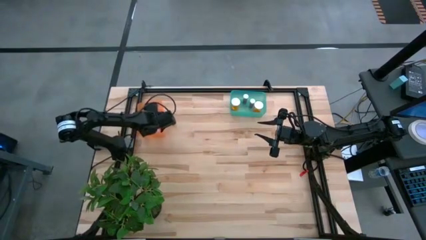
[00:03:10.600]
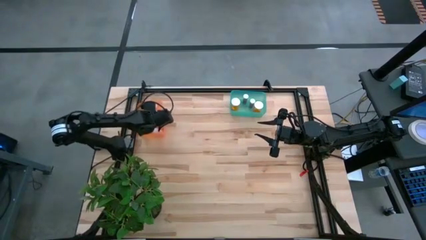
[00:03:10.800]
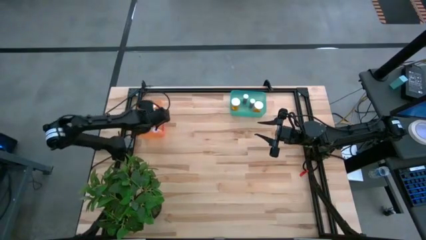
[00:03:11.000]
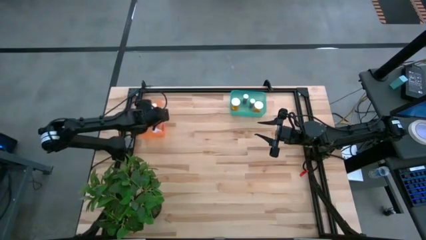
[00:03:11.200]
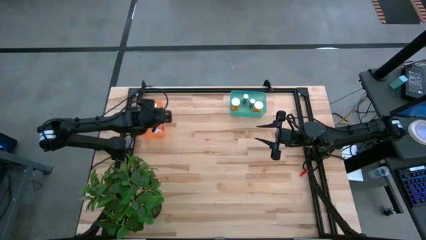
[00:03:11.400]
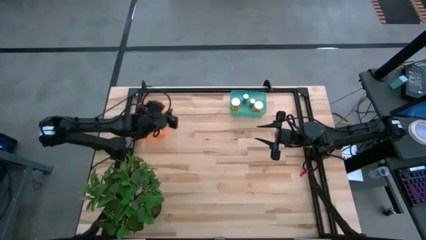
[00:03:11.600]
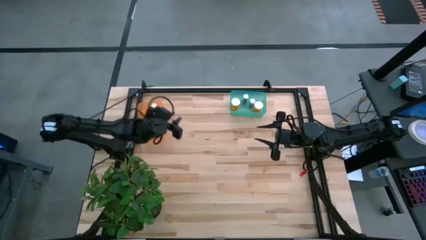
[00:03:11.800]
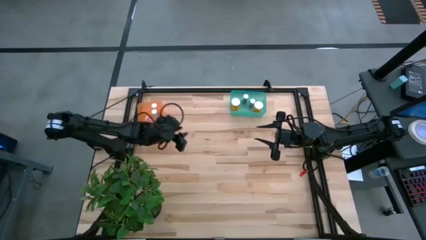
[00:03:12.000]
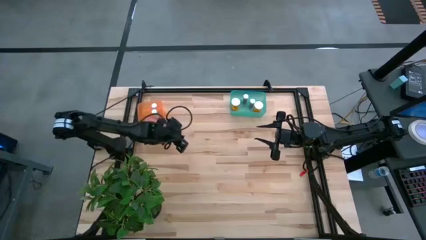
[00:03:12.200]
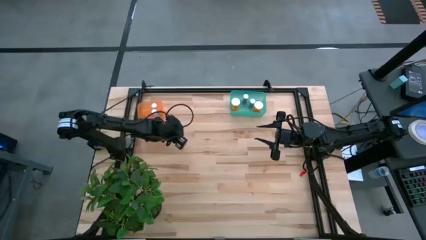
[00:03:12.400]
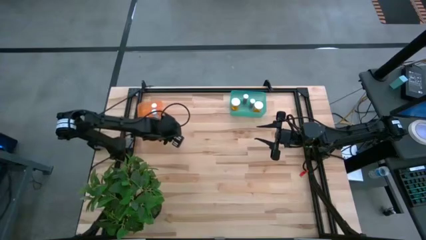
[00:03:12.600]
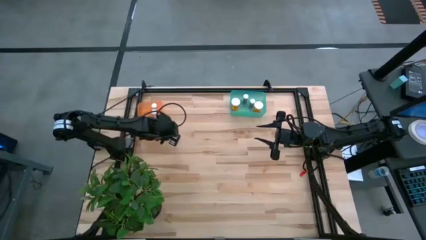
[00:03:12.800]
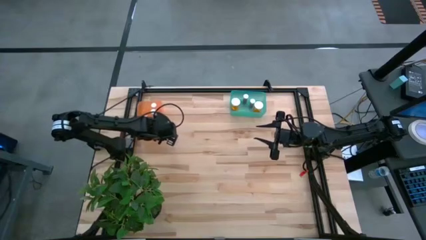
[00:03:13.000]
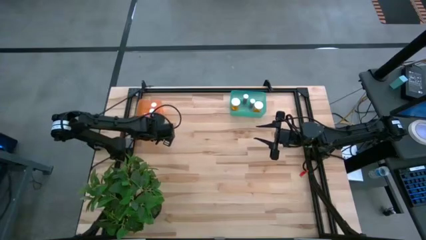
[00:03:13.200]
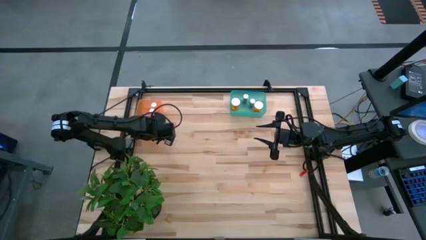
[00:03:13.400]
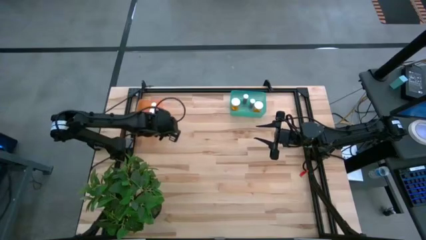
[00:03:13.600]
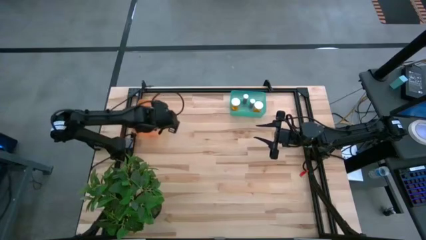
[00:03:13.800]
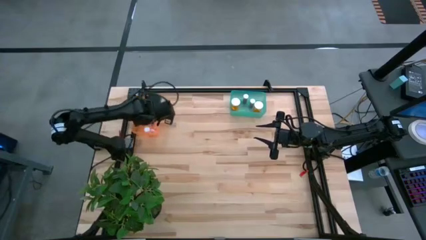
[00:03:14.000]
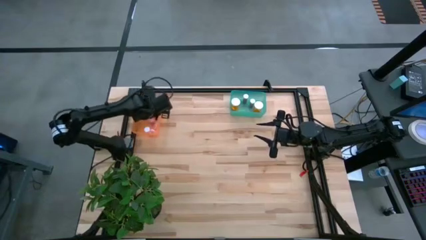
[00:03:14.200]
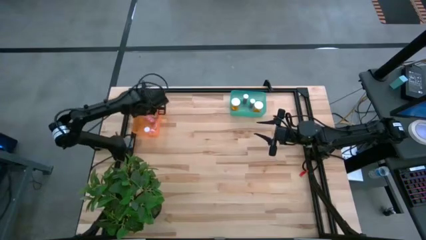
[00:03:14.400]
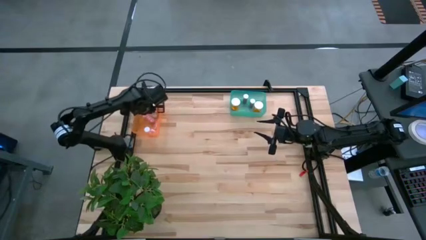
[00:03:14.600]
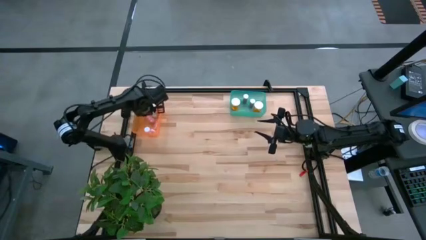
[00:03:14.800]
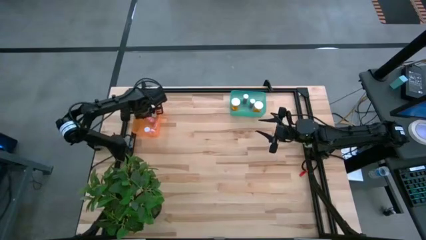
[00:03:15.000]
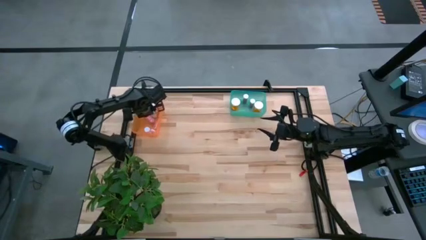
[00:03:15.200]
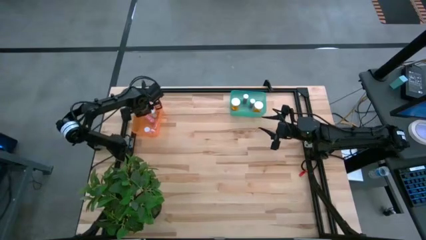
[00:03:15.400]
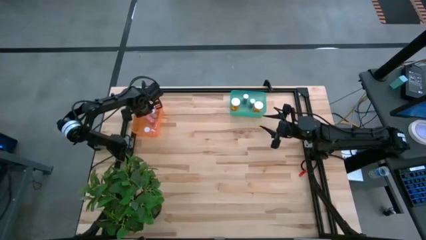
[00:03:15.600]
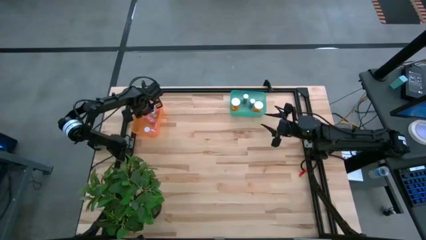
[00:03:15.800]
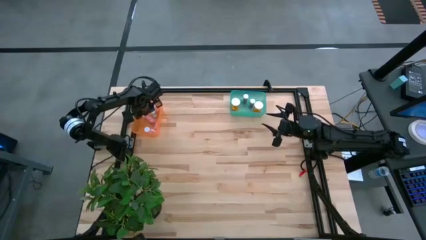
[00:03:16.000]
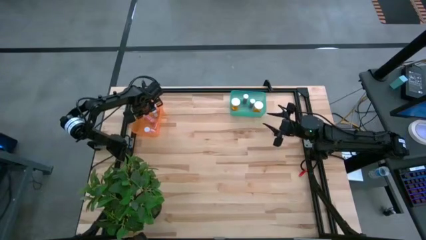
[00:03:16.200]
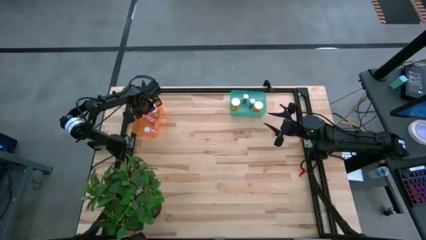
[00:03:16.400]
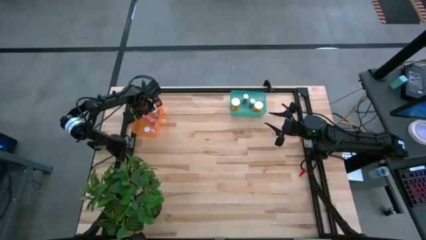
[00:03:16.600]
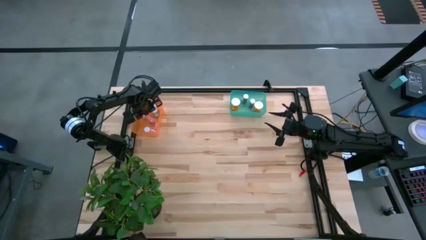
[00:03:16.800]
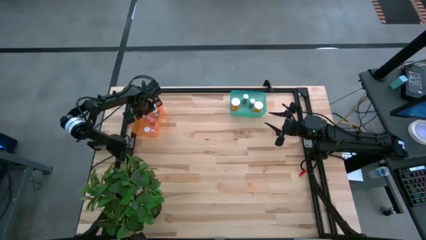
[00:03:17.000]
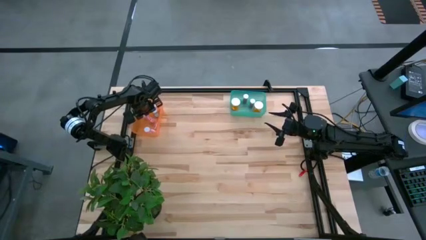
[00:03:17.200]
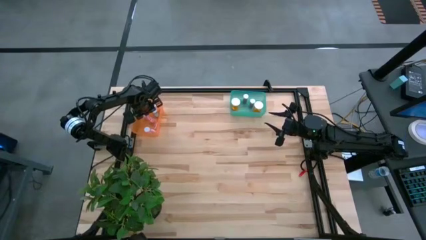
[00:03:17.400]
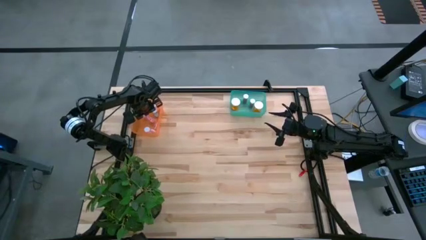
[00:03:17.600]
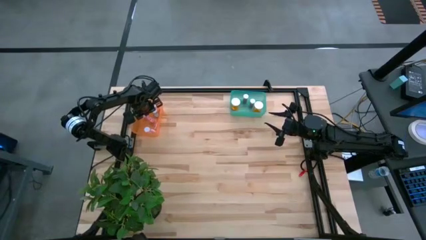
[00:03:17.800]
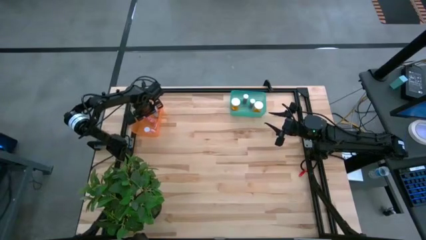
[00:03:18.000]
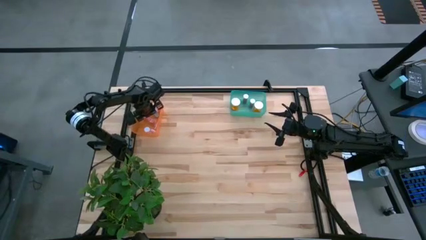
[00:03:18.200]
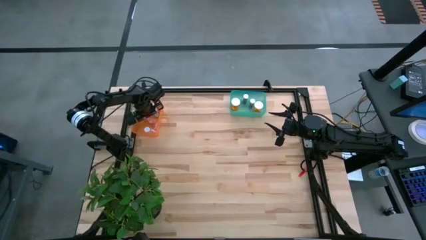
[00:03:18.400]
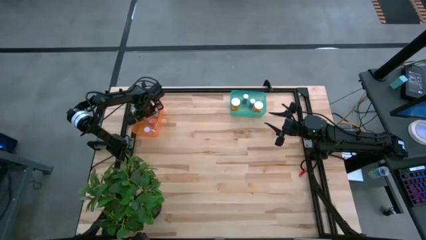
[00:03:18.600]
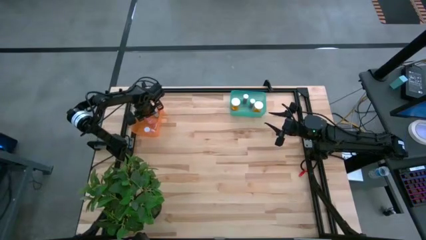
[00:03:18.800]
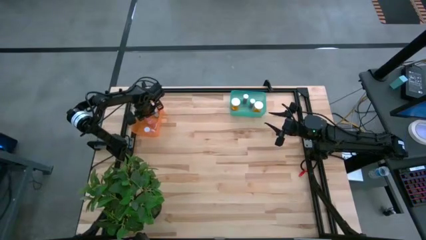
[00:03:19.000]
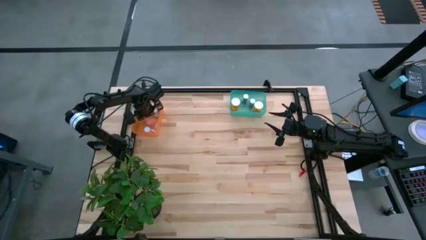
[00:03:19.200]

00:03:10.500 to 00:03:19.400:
Task: Pick and place medicine bottles into bin by pill shape (circle, oval)
Adjust the pink tablet bottle in the orange bin

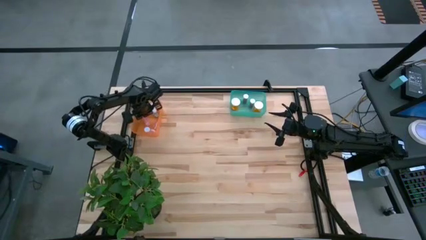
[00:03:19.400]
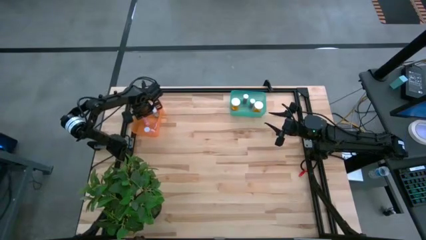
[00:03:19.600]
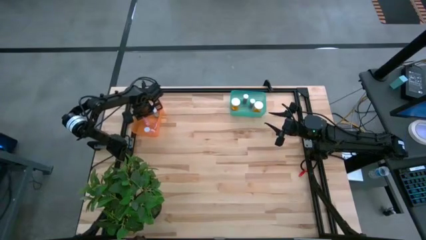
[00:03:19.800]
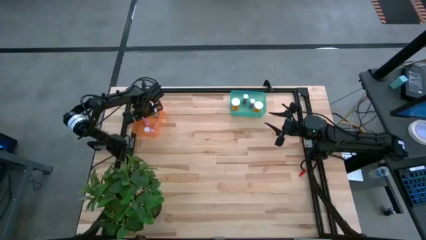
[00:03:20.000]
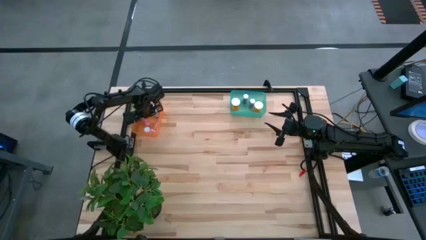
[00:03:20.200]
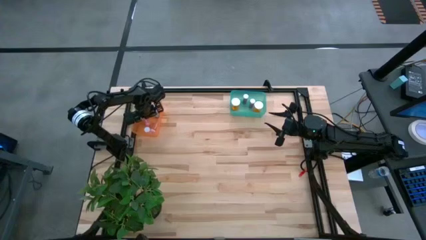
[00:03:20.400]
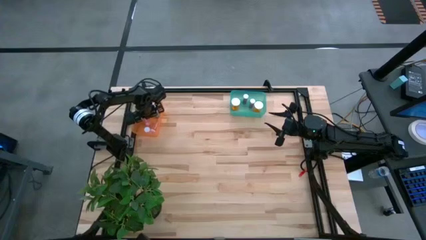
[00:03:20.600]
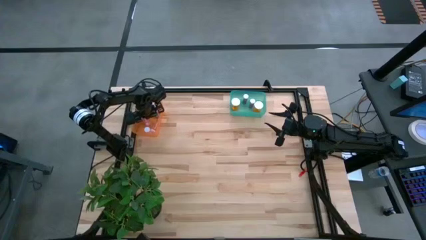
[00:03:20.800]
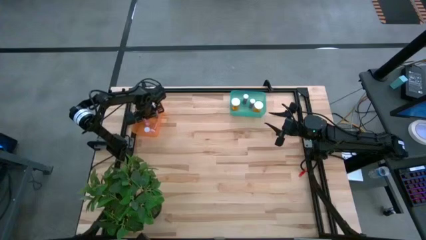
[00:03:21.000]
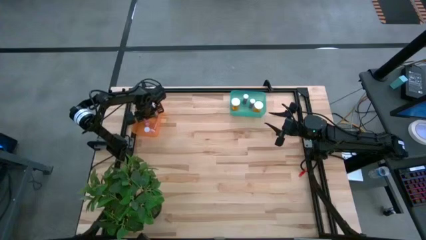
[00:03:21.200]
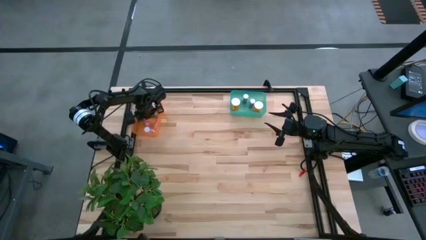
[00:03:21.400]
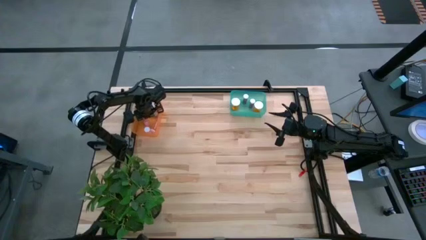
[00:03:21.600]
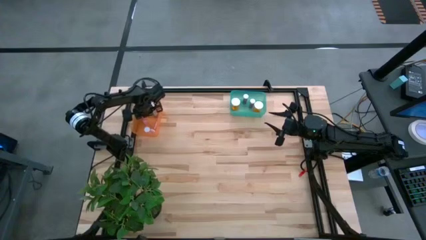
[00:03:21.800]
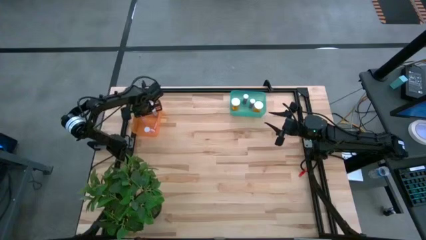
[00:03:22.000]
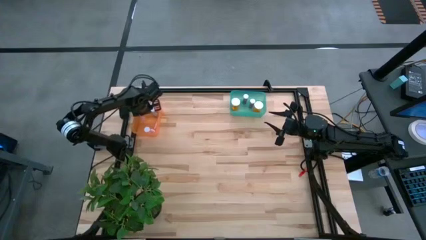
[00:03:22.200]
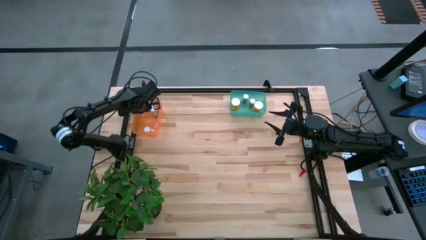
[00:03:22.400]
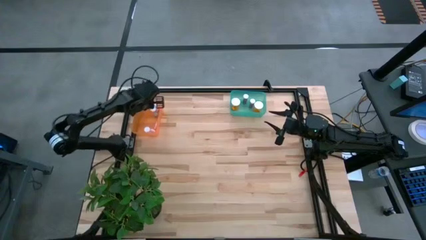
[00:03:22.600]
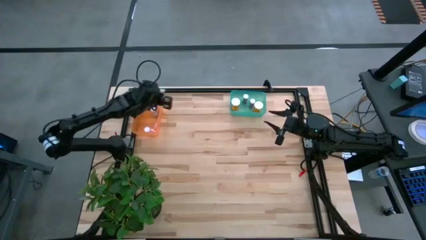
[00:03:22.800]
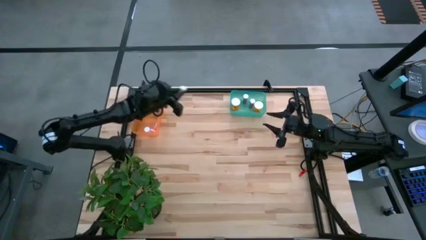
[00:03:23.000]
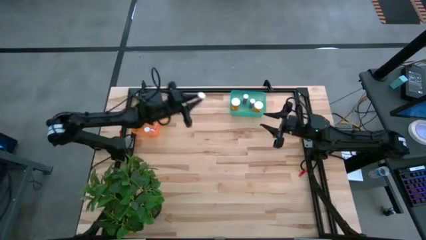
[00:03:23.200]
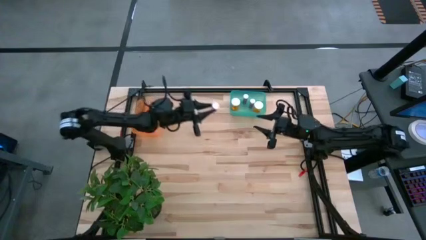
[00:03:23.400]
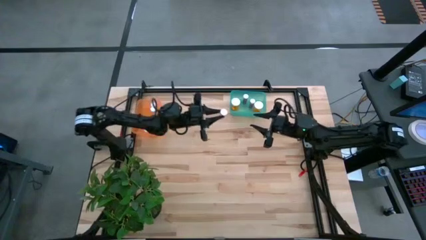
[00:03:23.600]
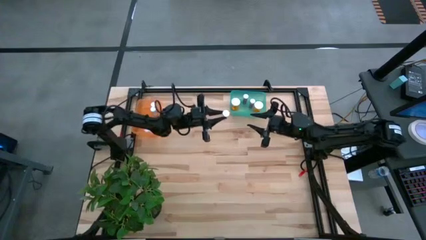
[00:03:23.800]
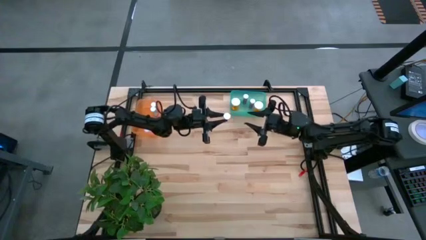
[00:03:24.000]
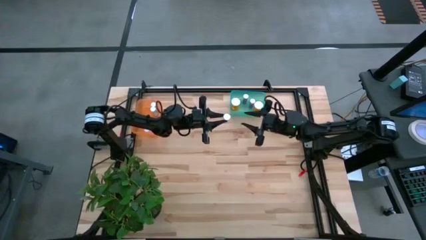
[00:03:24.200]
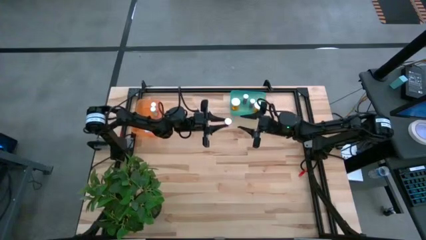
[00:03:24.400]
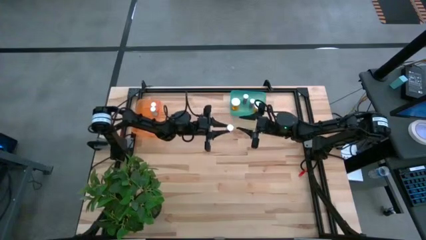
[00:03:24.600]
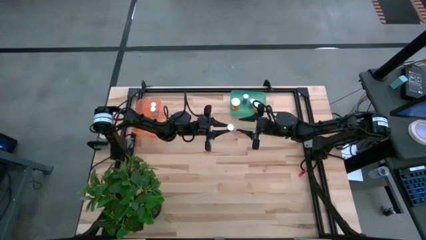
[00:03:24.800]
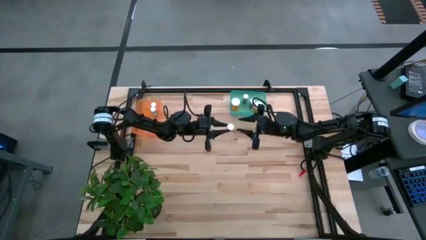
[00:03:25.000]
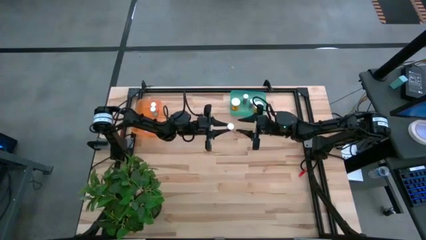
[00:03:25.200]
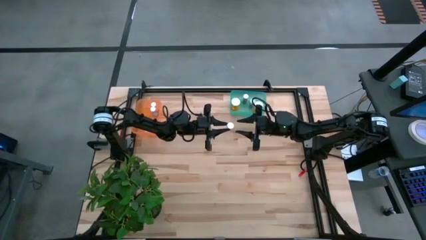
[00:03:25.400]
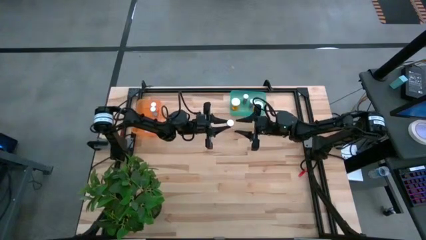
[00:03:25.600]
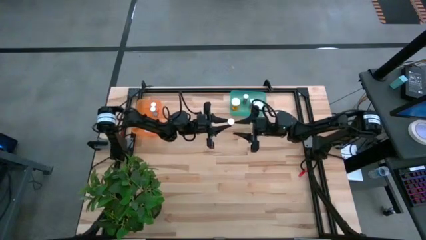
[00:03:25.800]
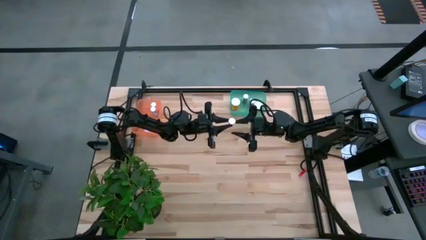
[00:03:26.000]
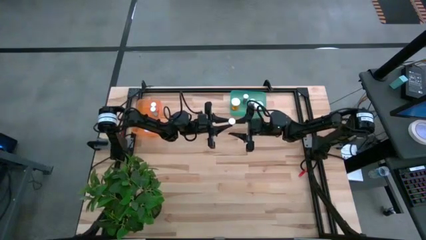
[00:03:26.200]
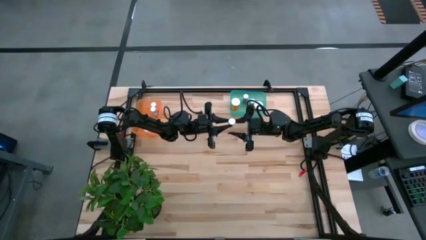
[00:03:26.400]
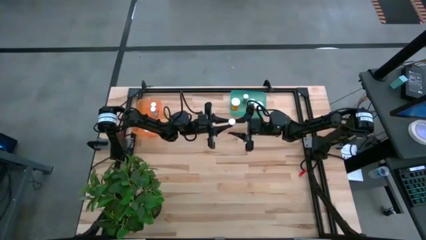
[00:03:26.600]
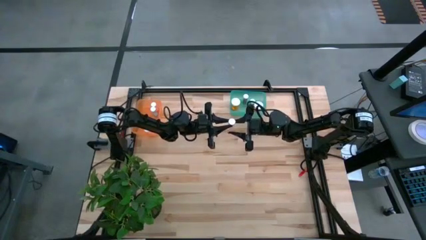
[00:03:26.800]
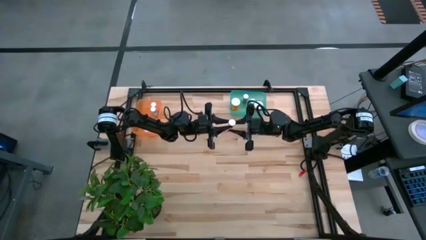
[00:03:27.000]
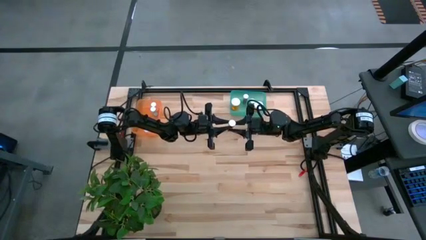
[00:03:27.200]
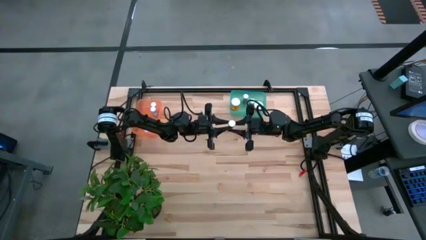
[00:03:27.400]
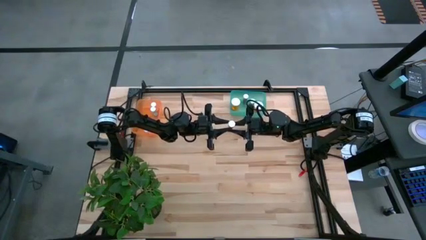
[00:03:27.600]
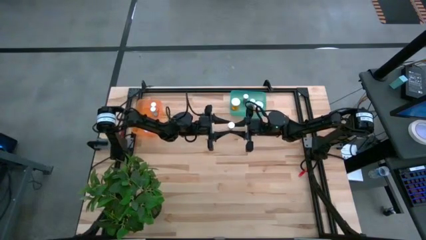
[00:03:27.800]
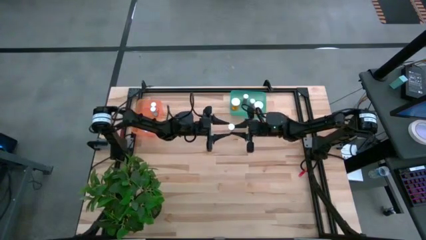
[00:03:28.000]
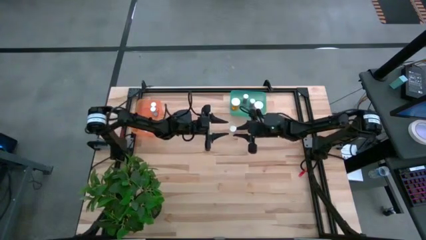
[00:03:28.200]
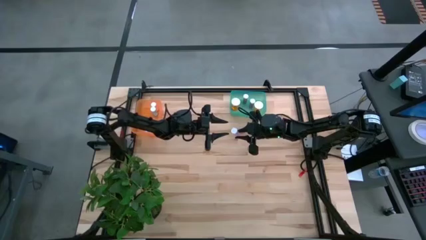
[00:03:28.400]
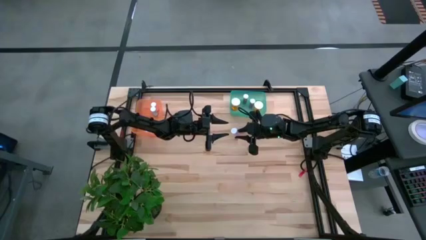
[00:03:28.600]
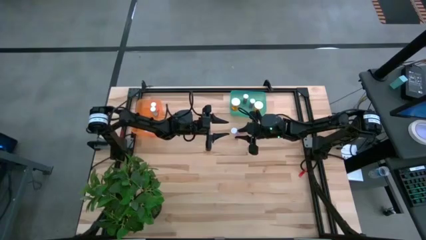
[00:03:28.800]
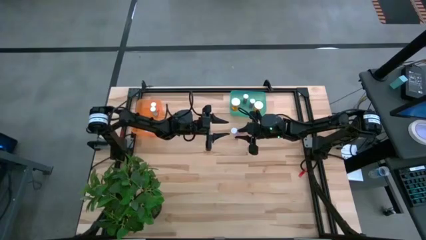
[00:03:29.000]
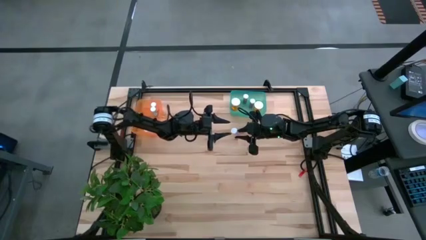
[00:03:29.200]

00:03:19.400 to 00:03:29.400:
Adjust the pink tablet bottle in the orange bin
